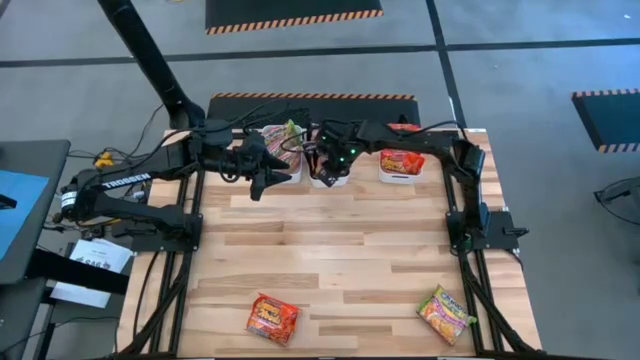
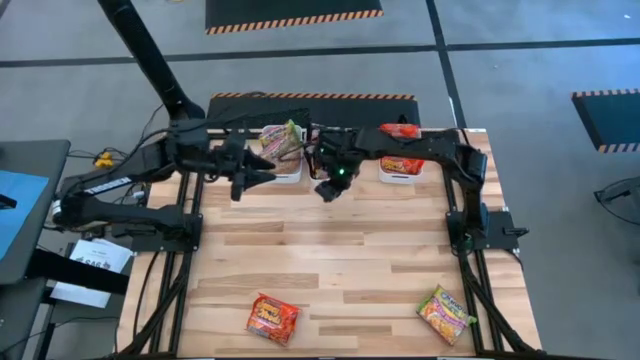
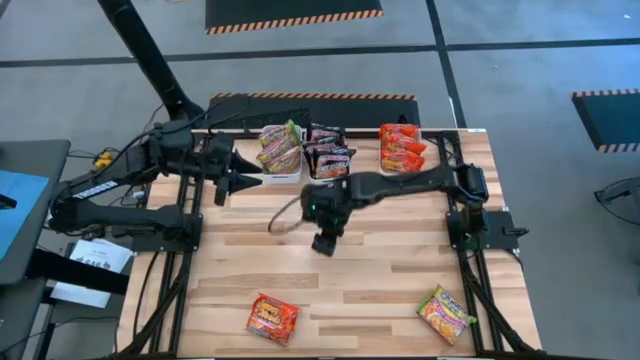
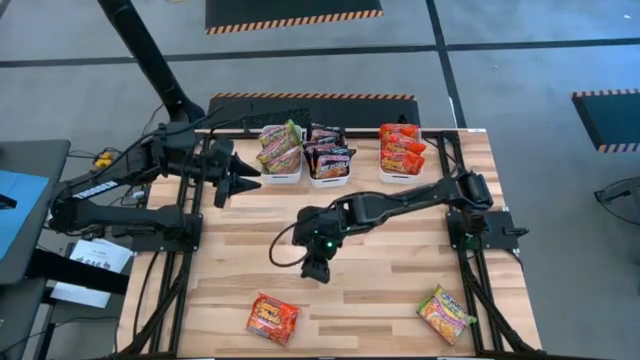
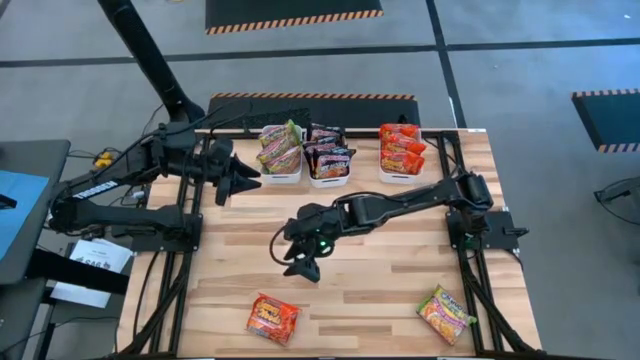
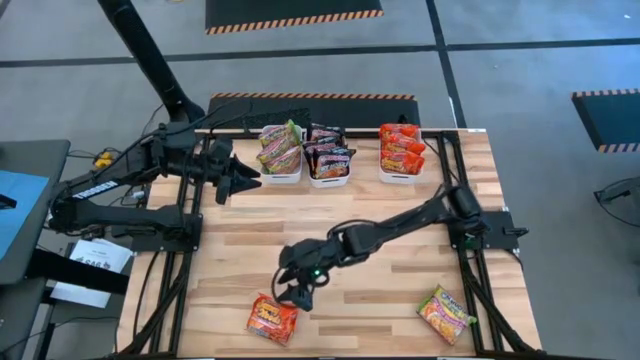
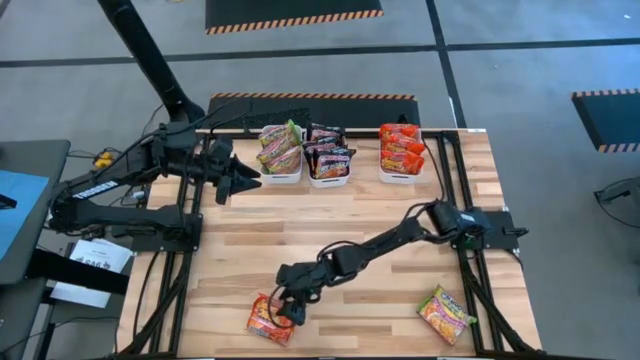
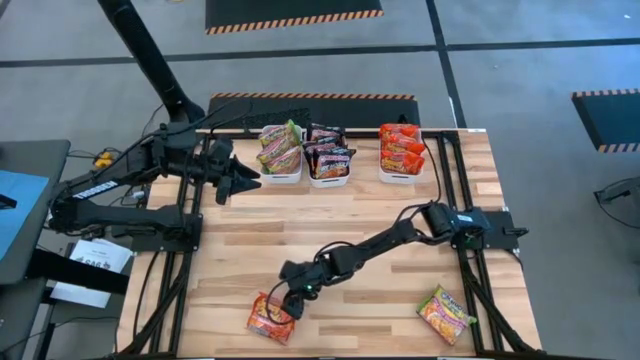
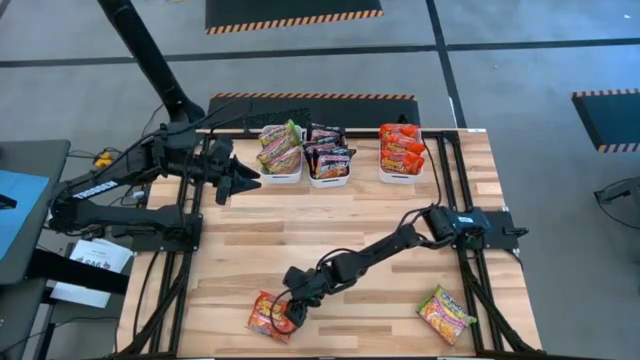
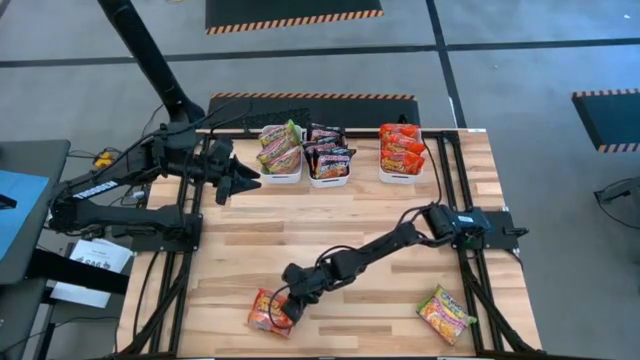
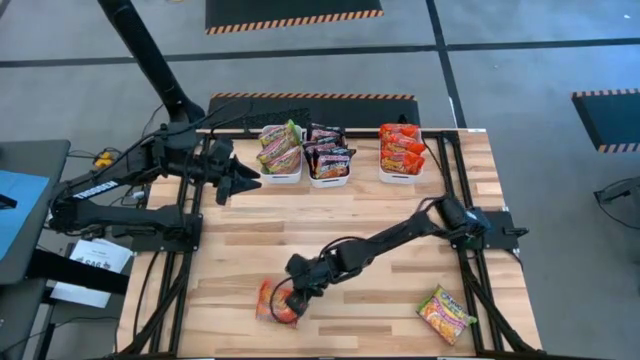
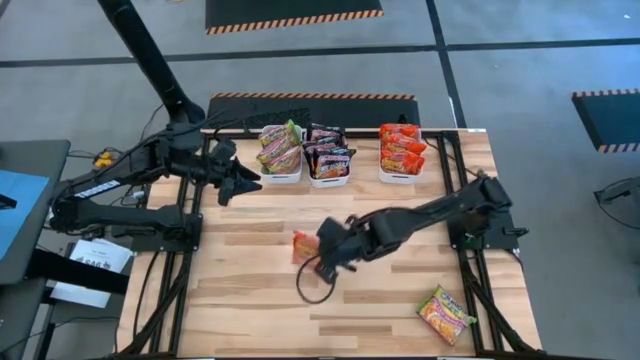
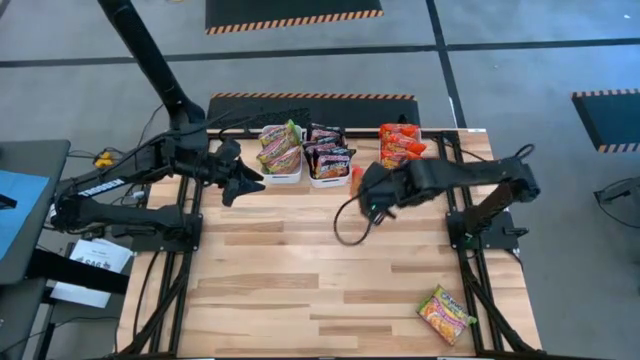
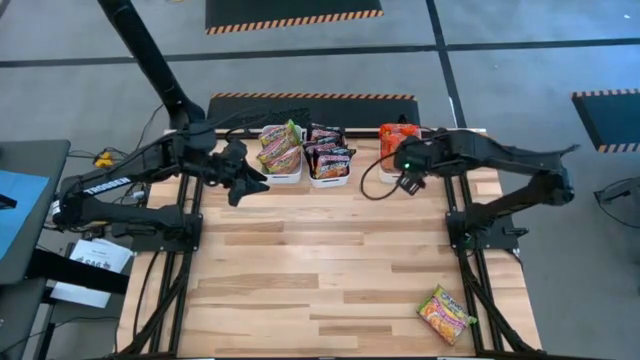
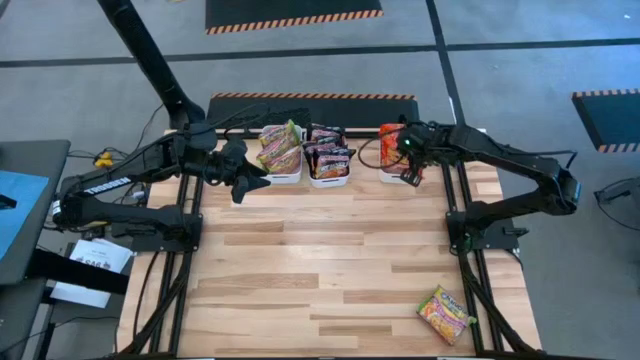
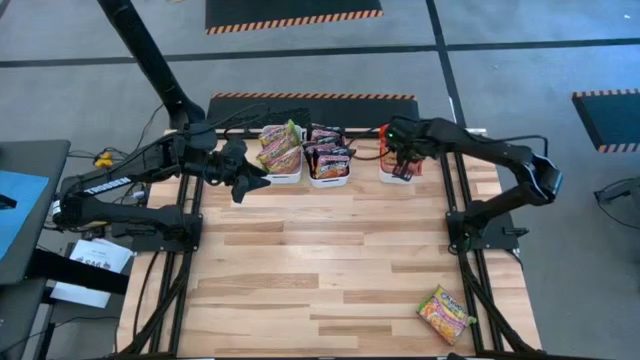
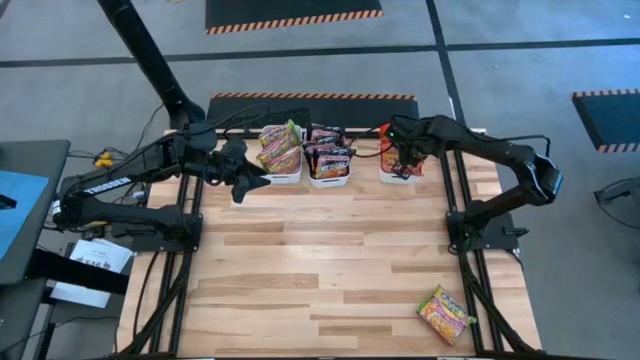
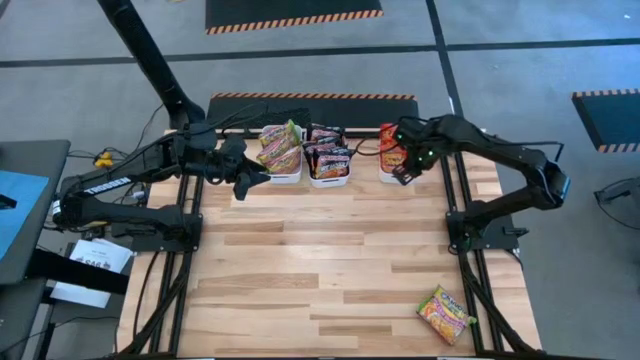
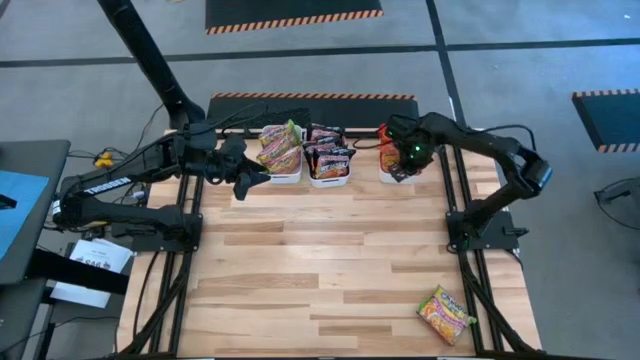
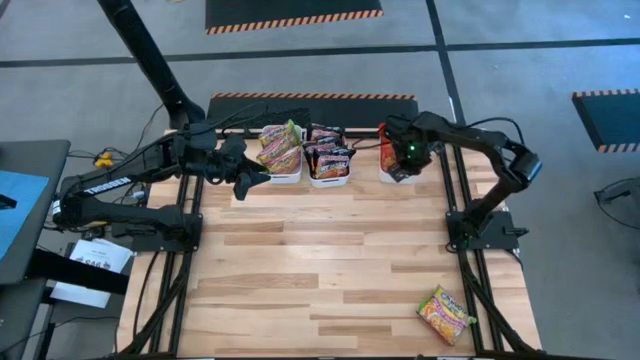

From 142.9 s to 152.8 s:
Task: Sort Maruchan noodles
Put the orange noodle pack into the right white bin

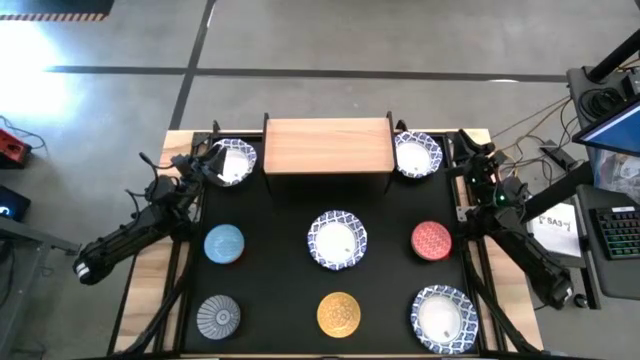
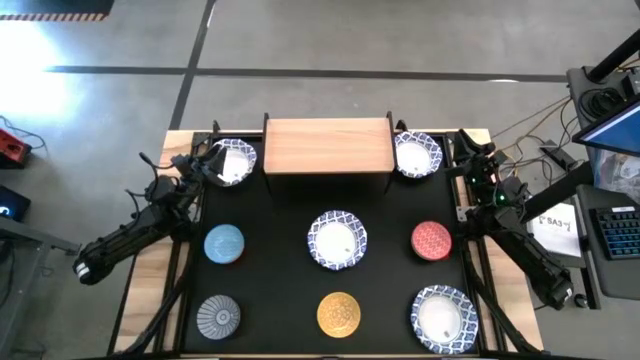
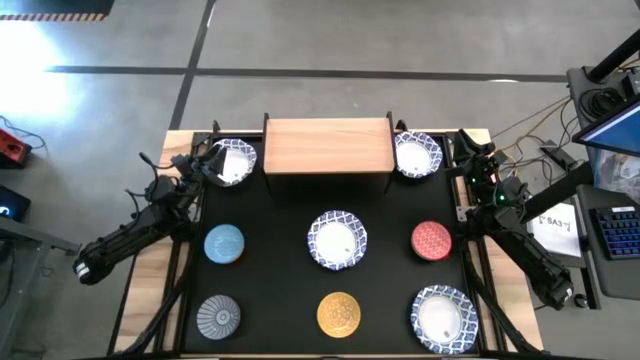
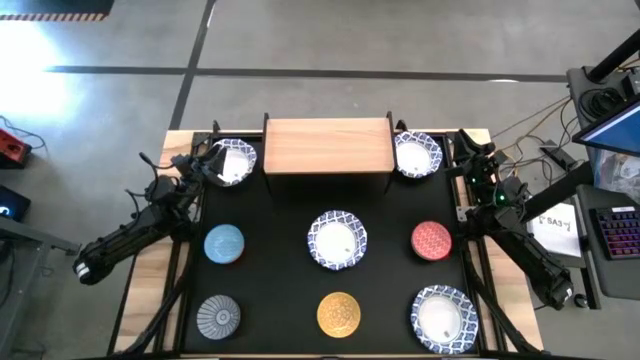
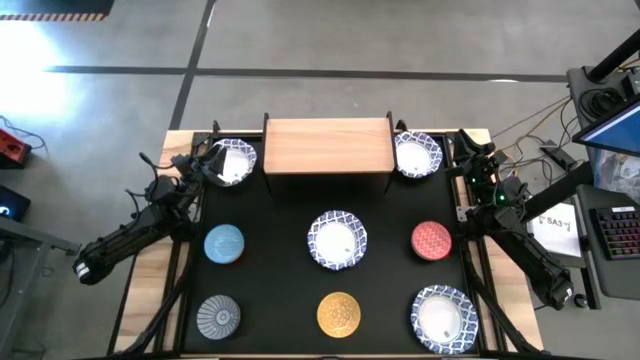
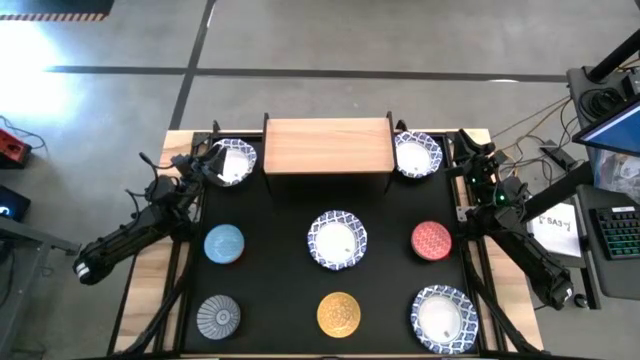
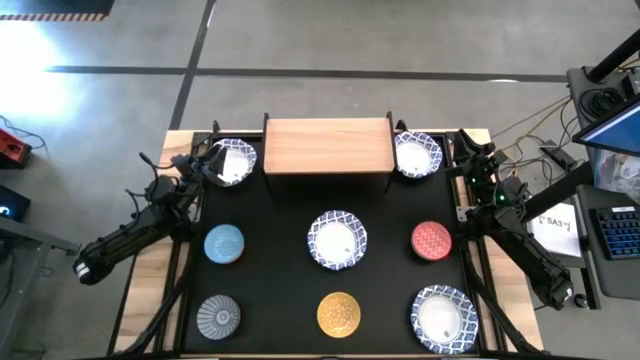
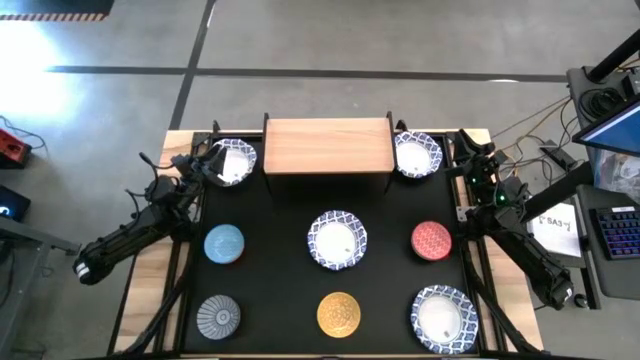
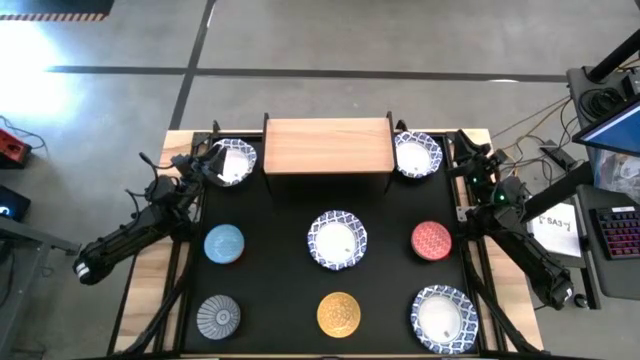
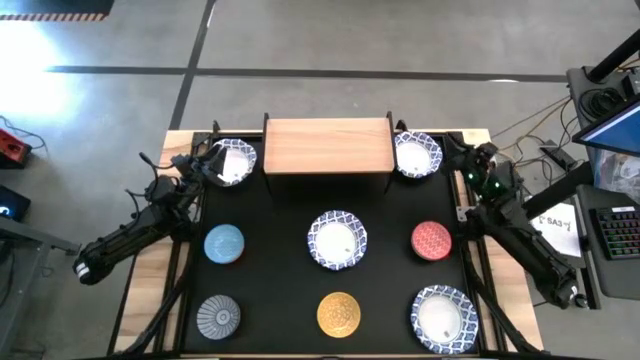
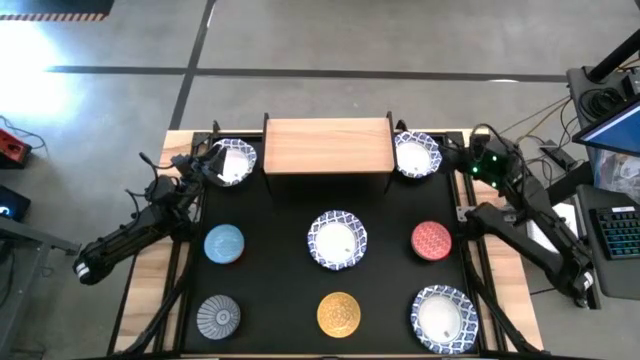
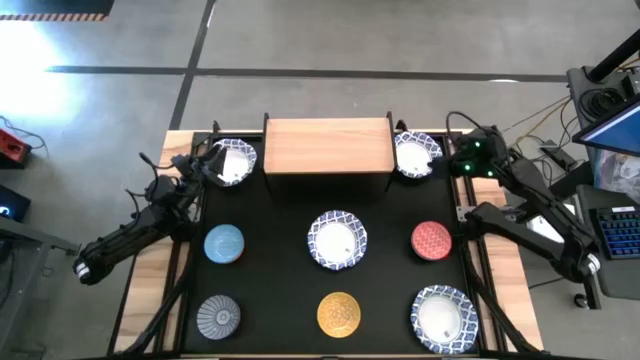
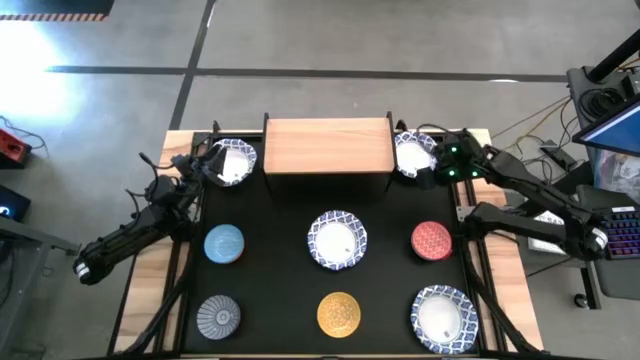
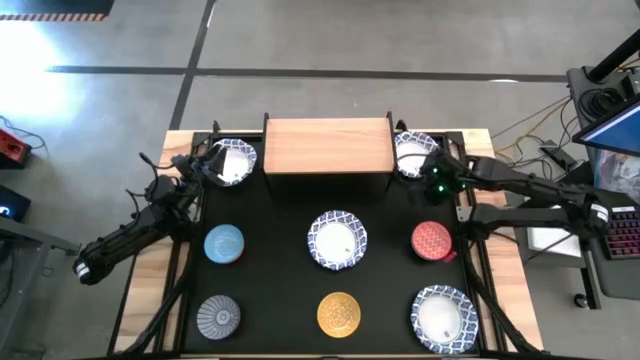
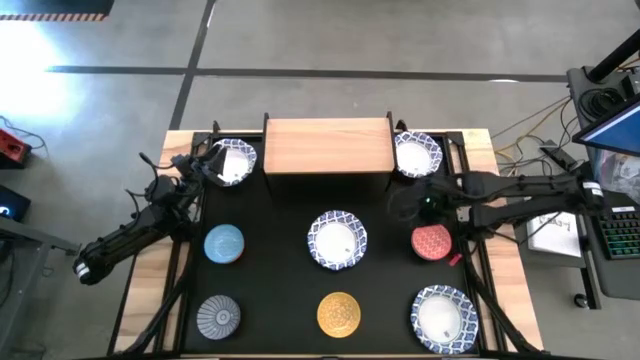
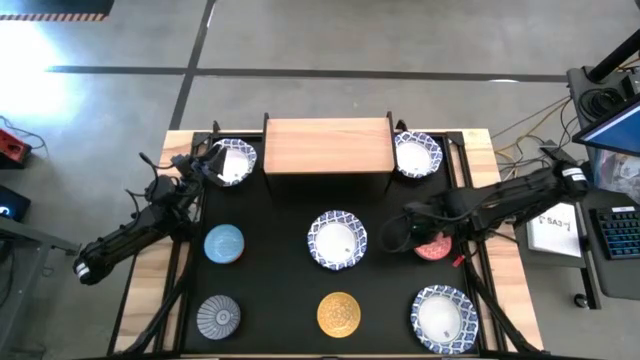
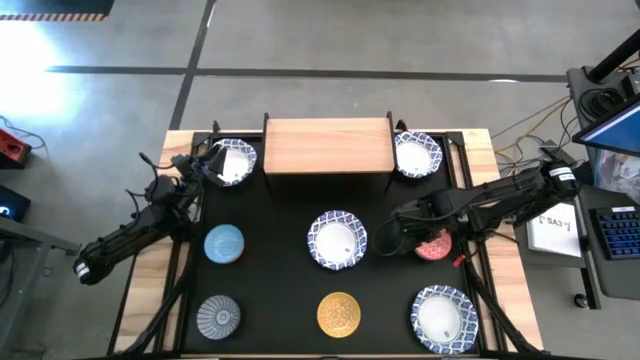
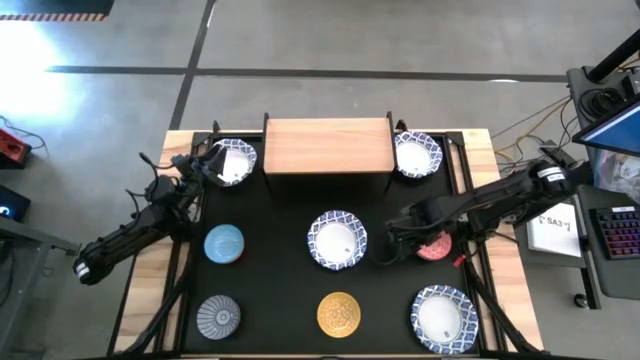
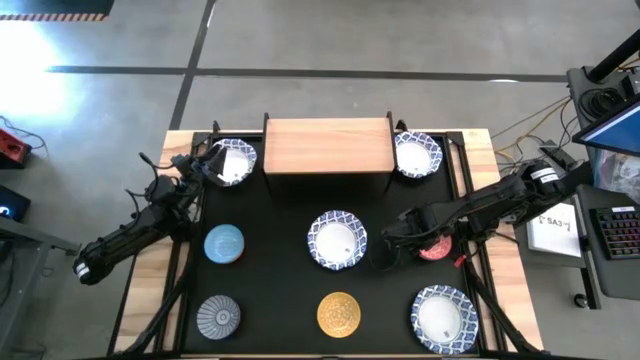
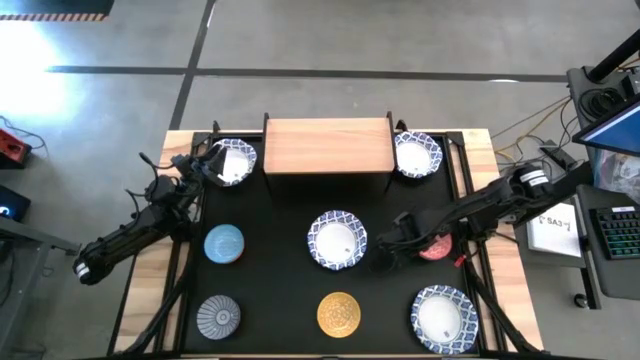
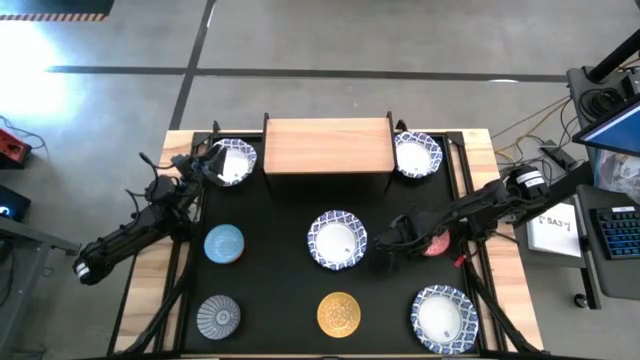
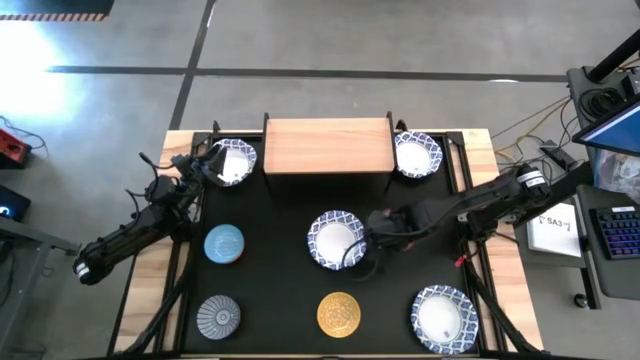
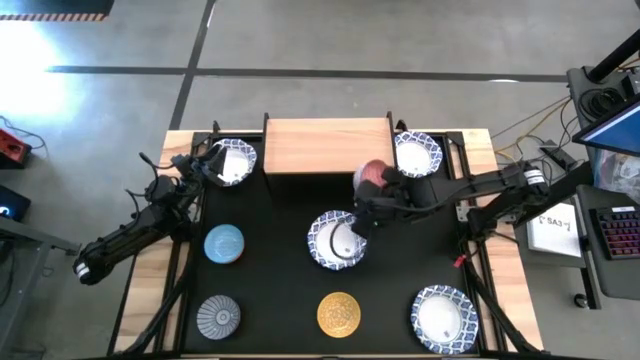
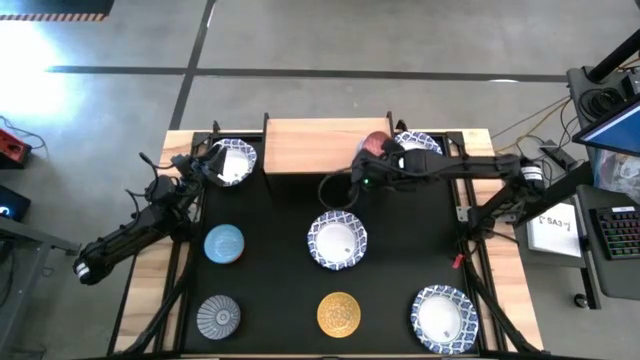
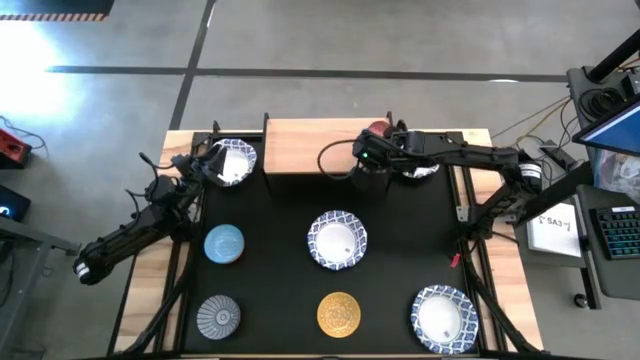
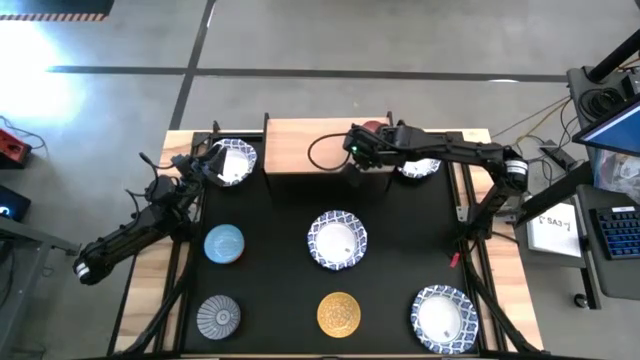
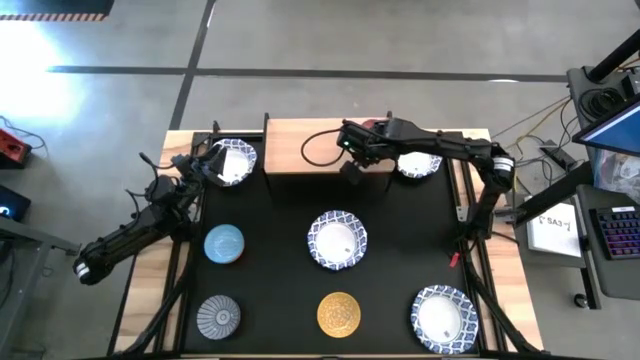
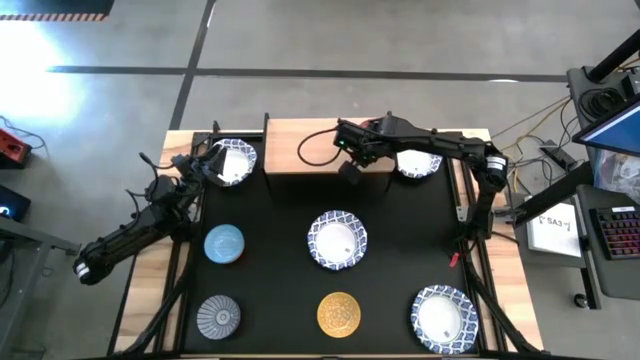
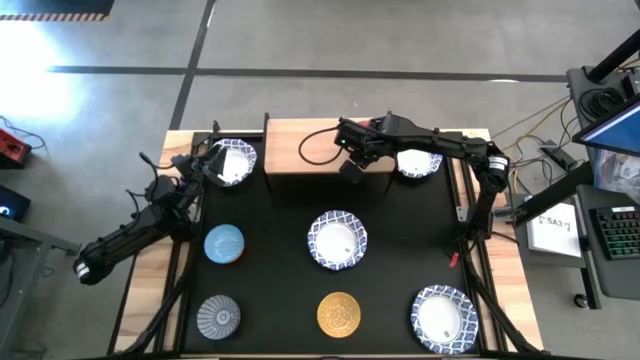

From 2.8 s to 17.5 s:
Task: Place and stack bowls onto a shelf
Put the red bowl on the shelf
